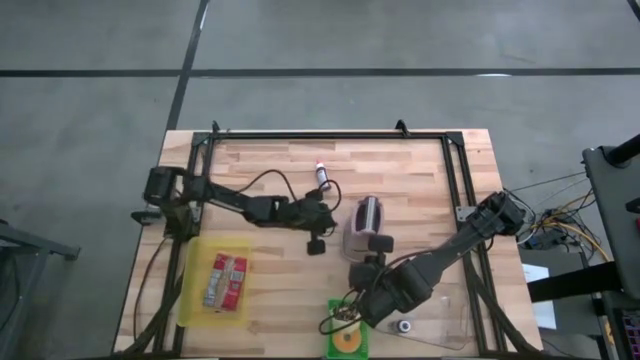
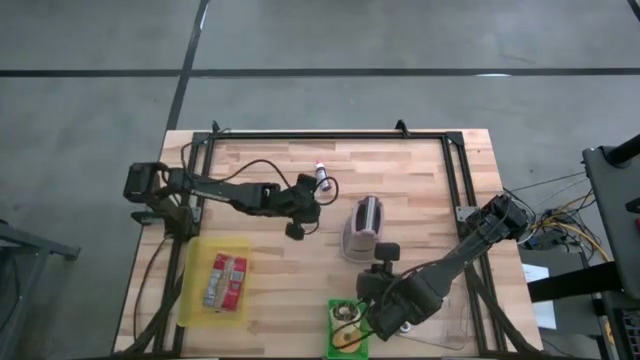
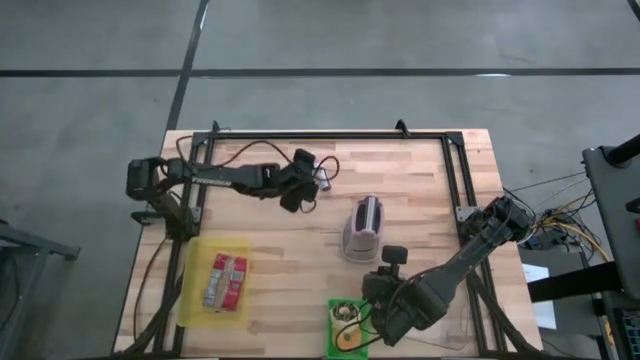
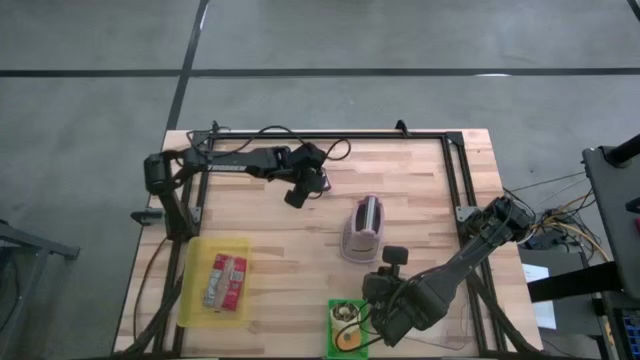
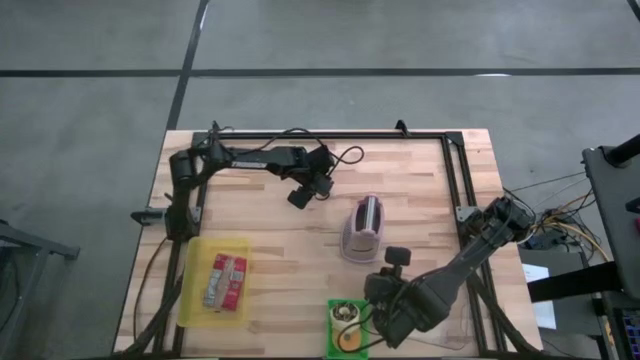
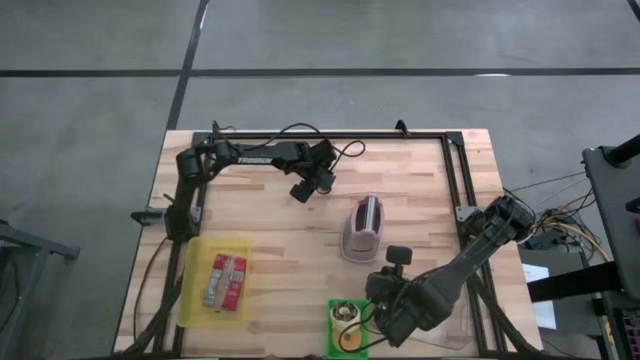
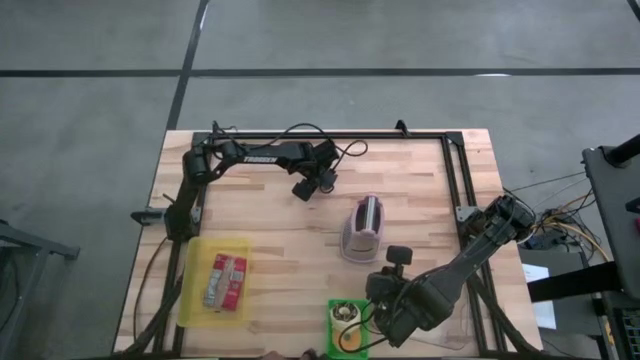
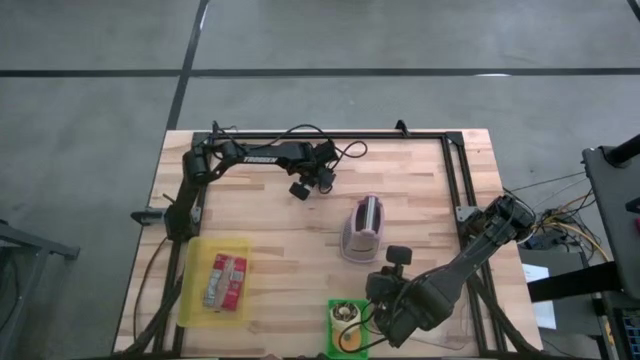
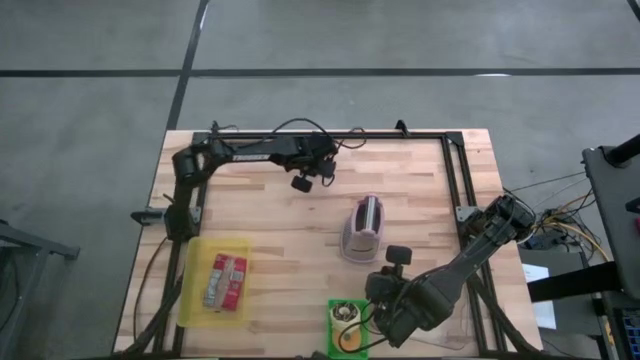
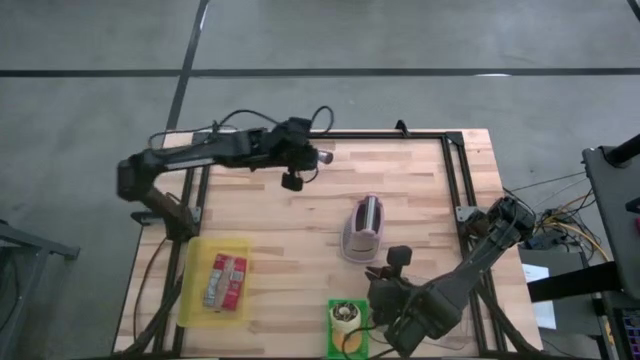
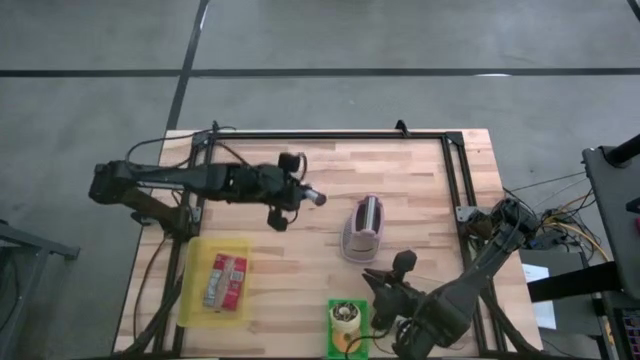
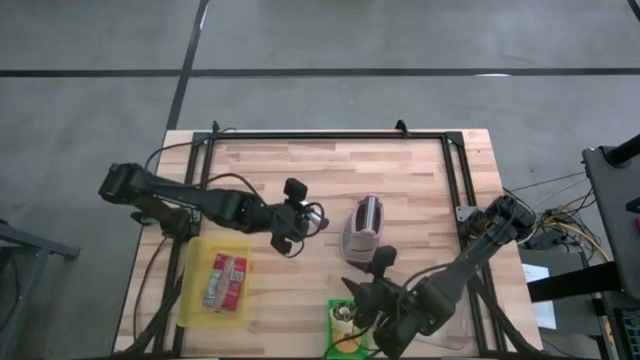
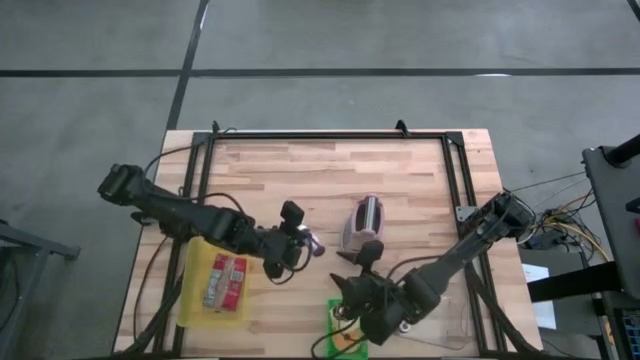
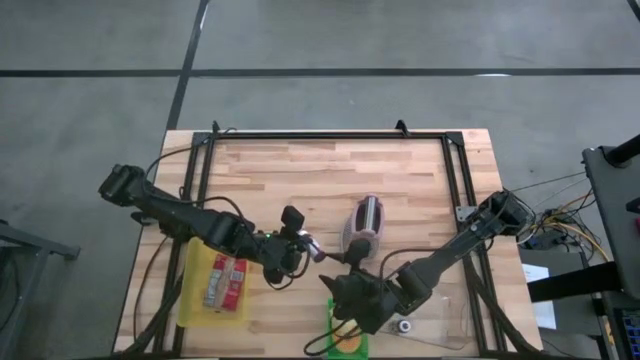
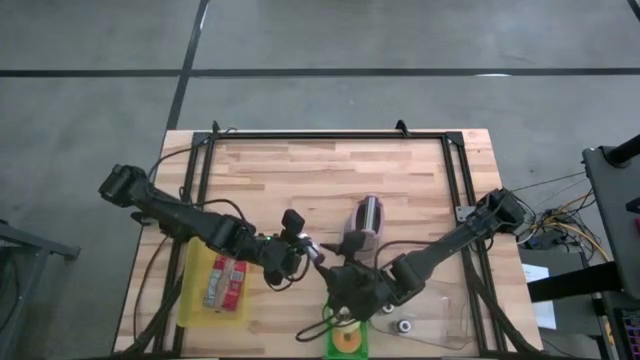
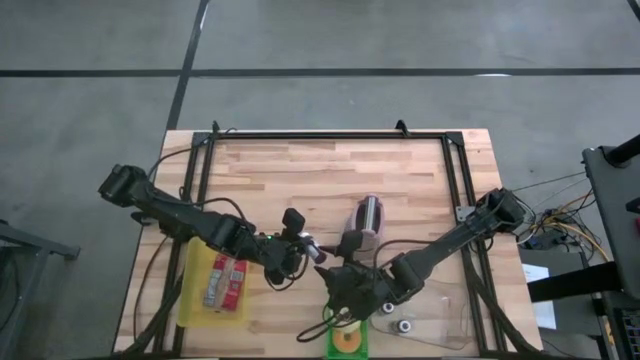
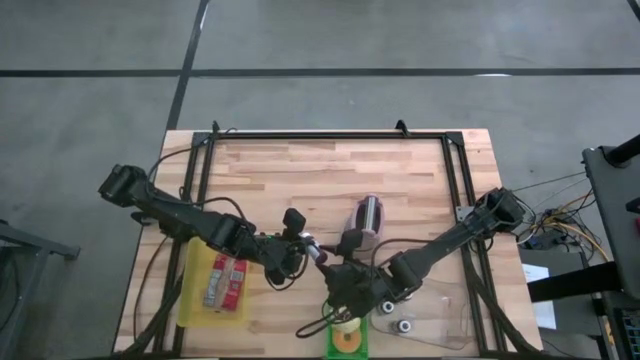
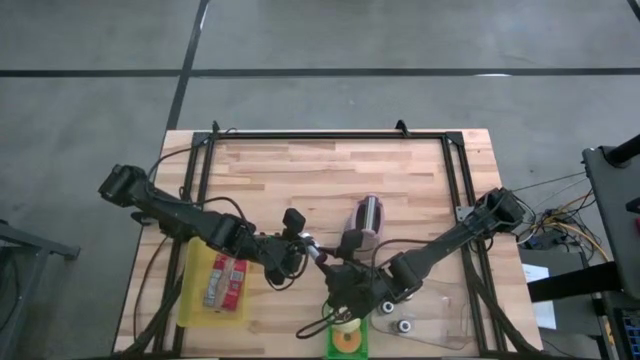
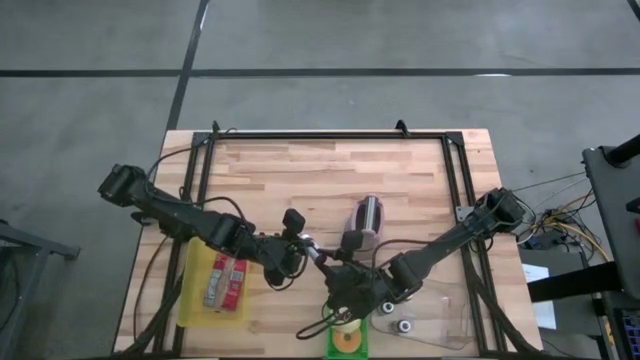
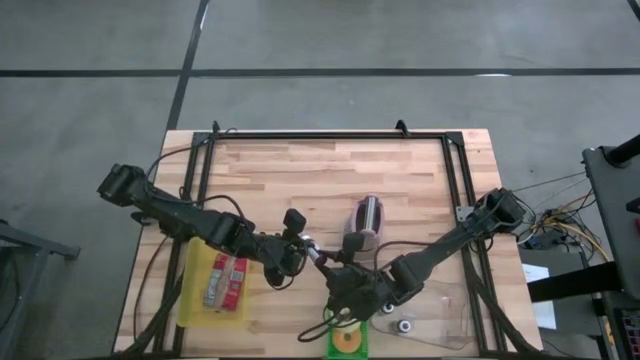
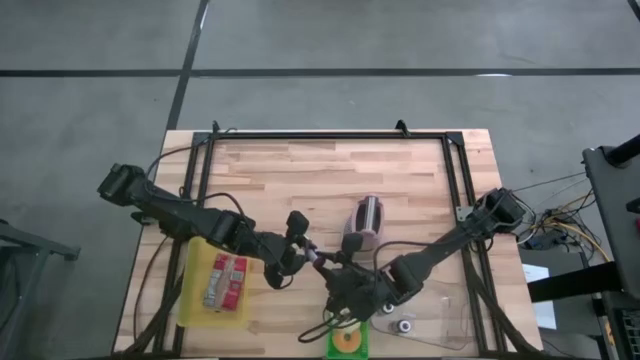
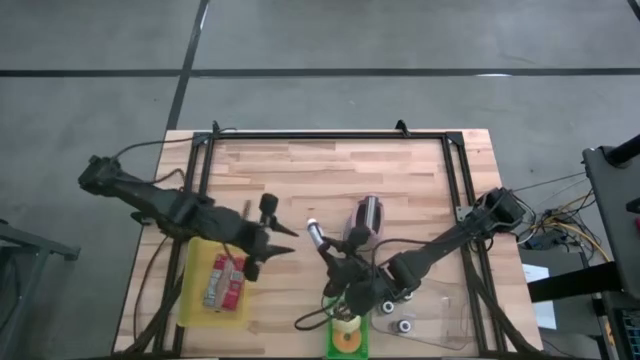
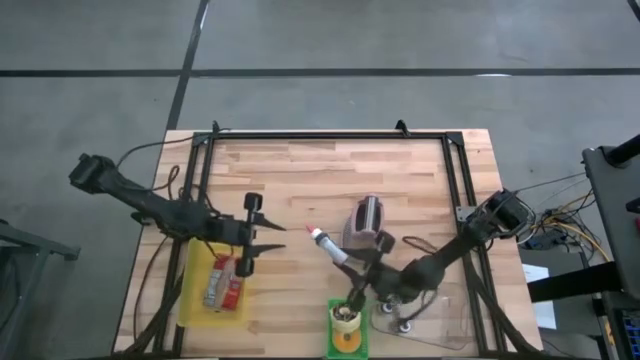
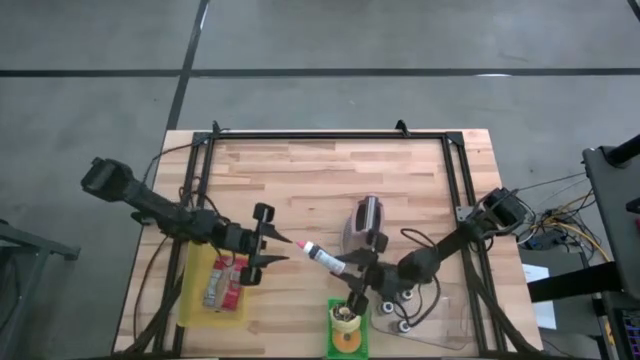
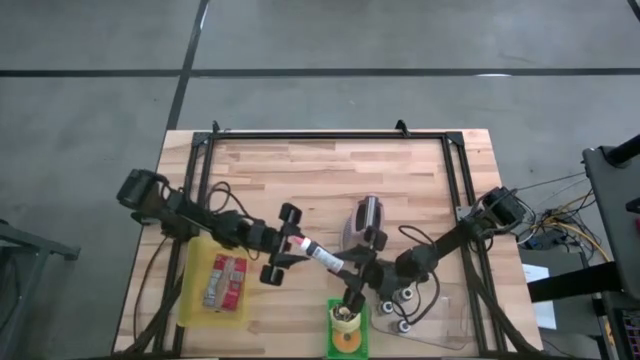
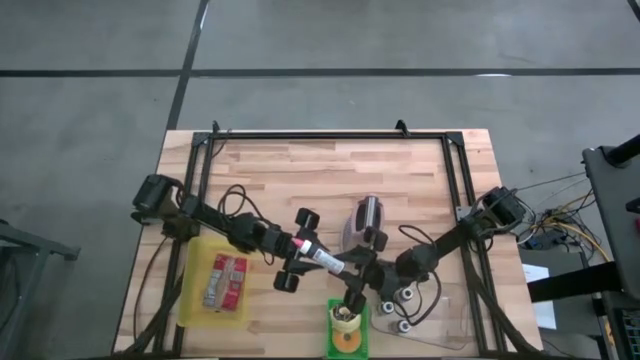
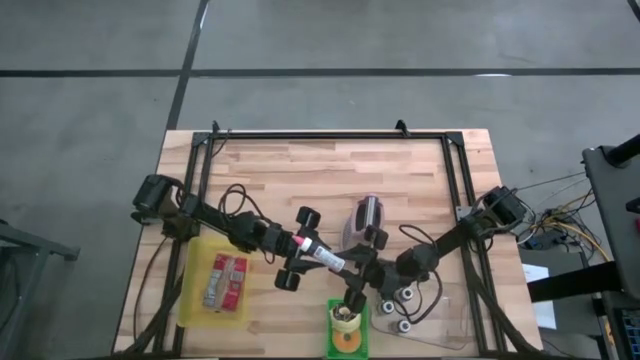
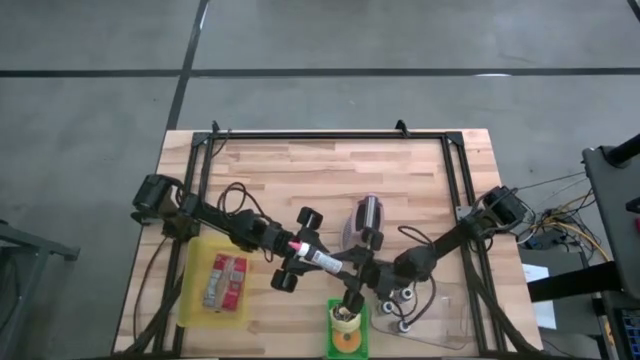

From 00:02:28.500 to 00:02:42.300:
Task: Pick & Place Food Item
Put the pink food coloring bottle into the transparent bin

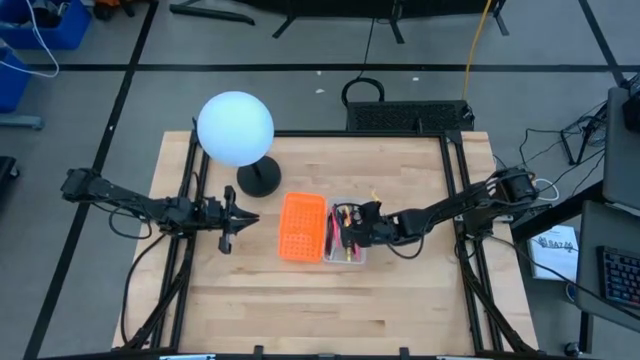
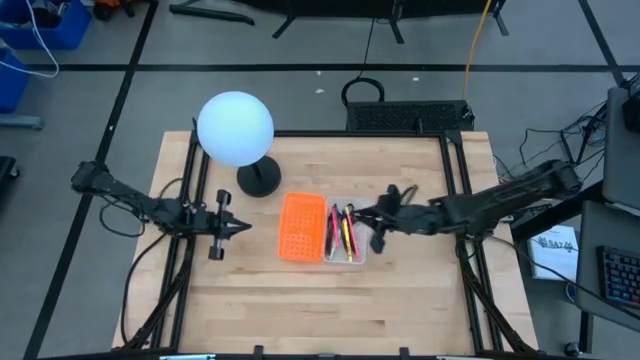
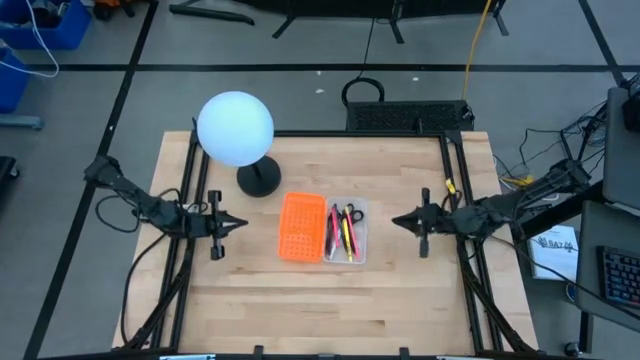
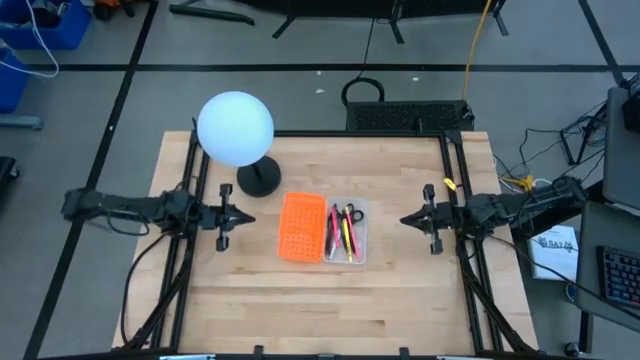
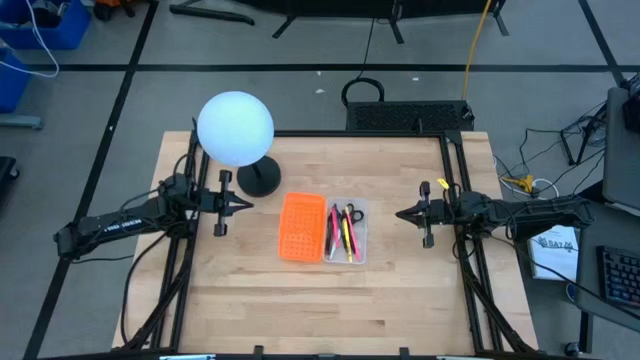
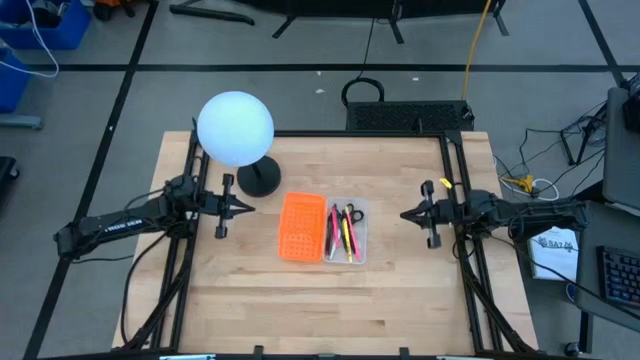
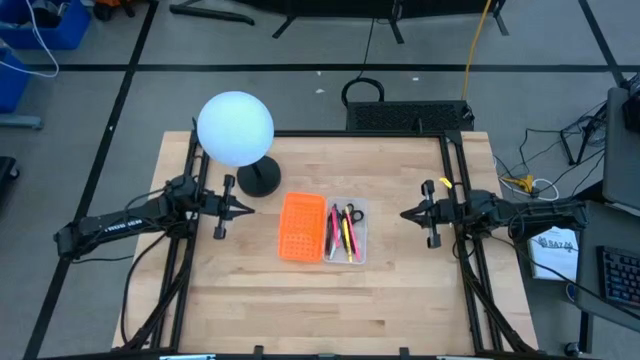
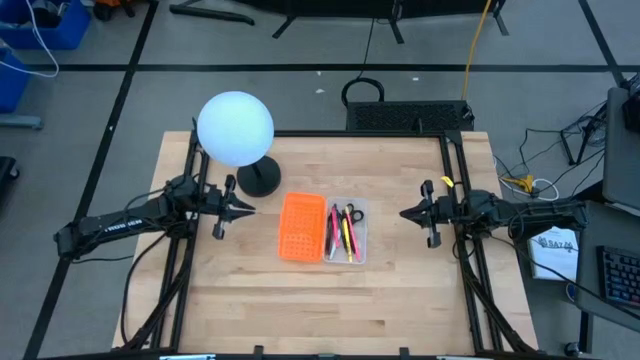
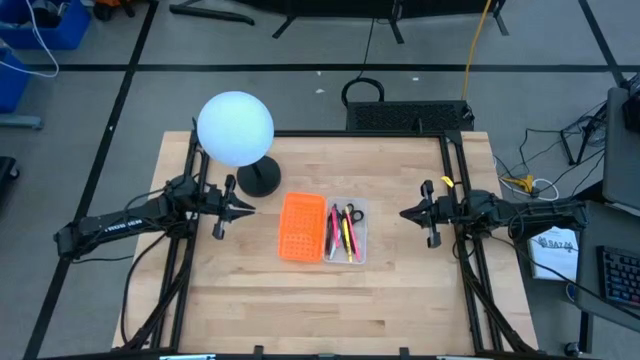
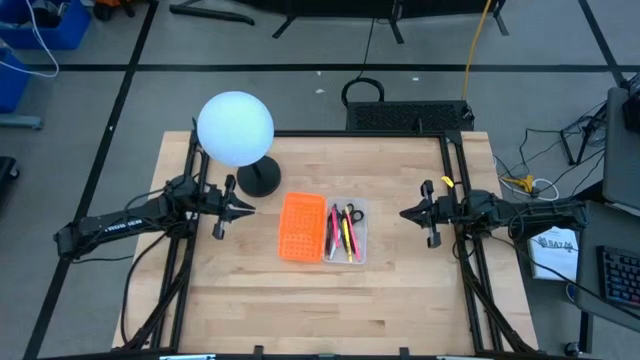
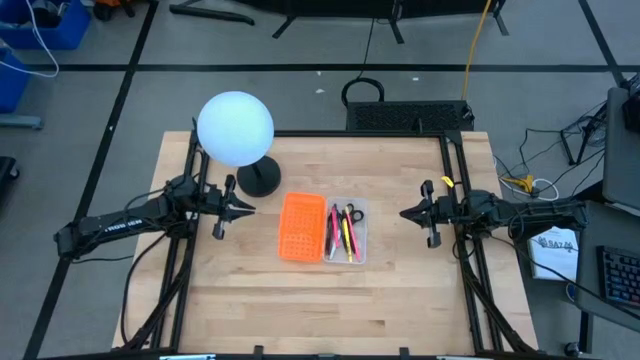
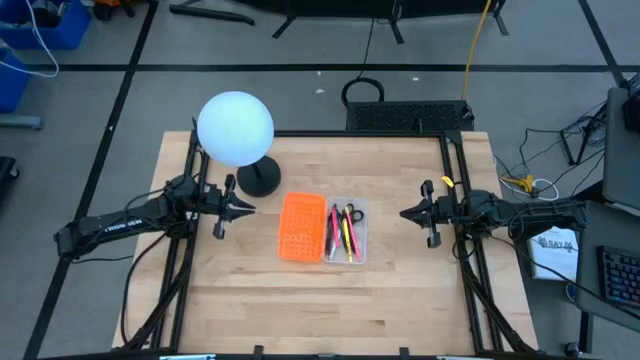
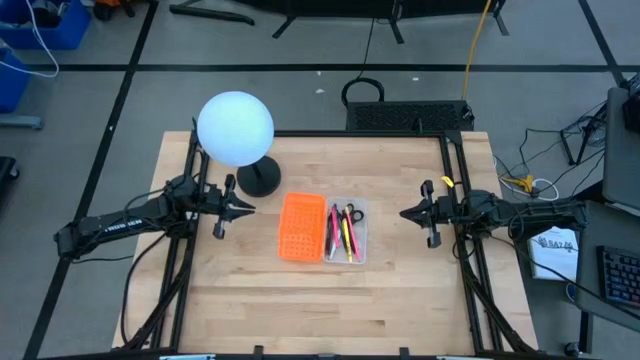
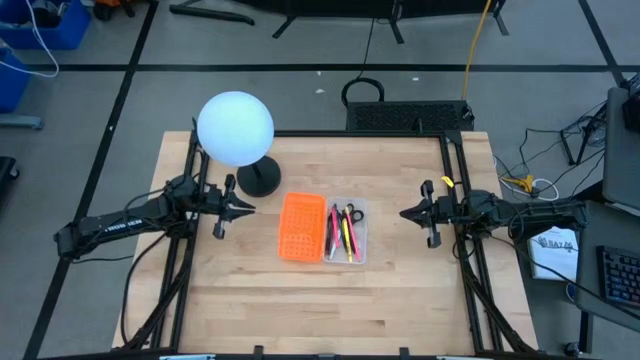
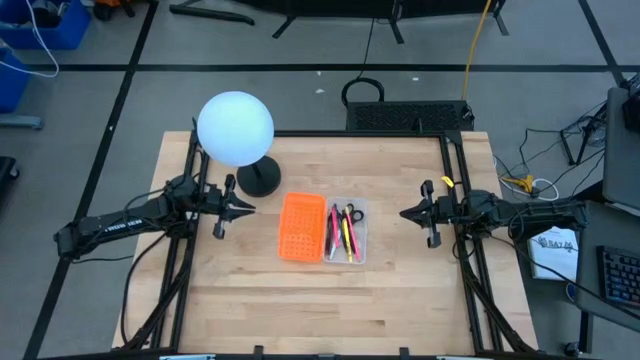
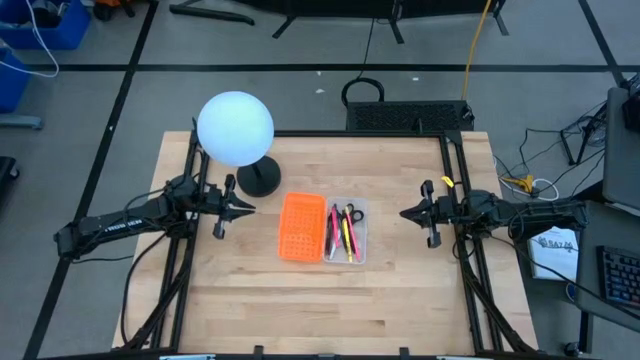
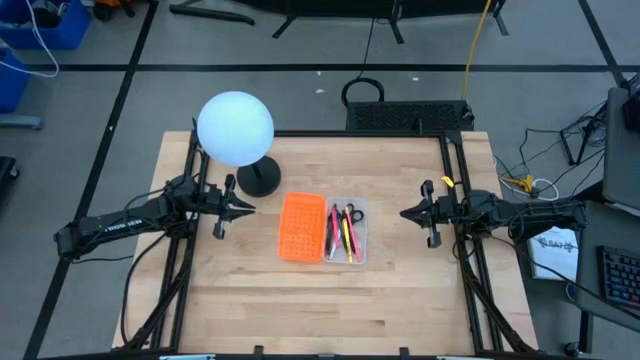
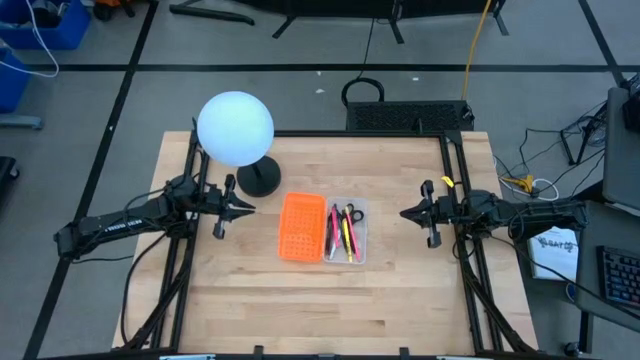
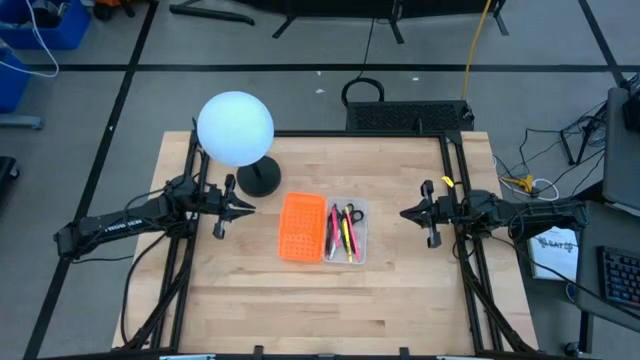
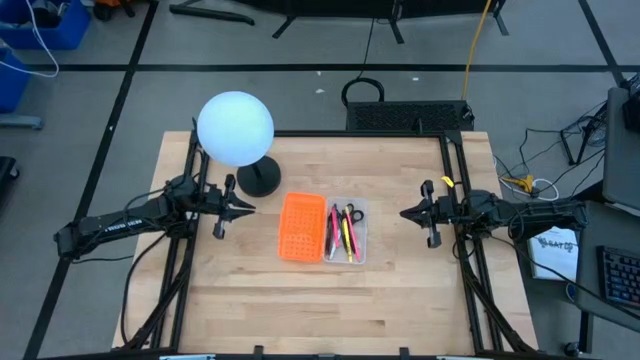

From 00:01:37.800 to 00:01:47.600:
Task: Pick & place school supplies into a supply box
Return to Home Position
